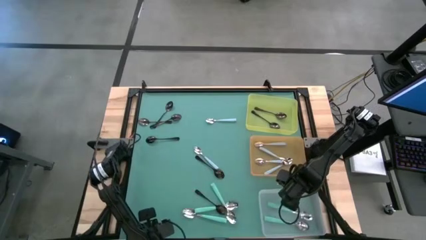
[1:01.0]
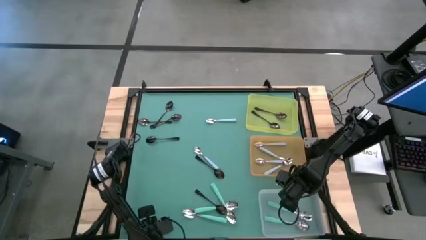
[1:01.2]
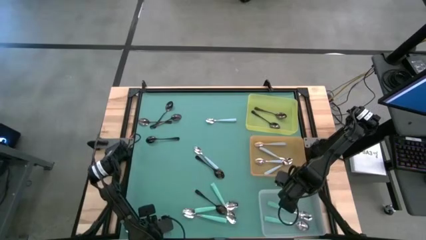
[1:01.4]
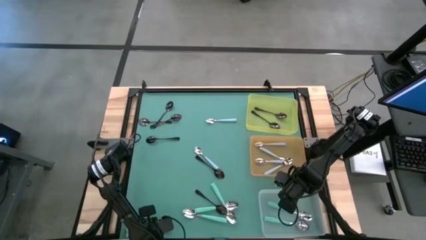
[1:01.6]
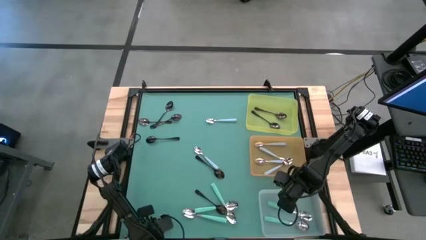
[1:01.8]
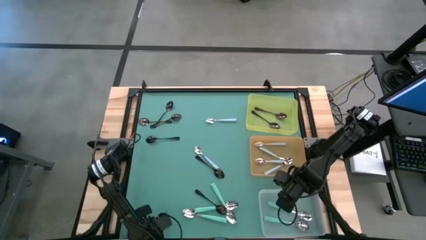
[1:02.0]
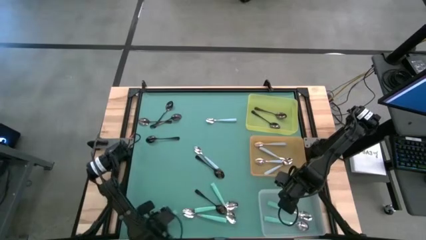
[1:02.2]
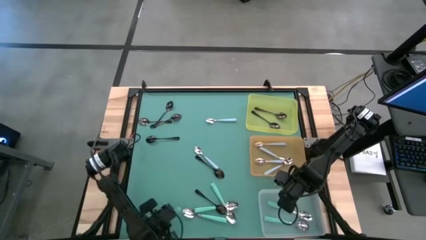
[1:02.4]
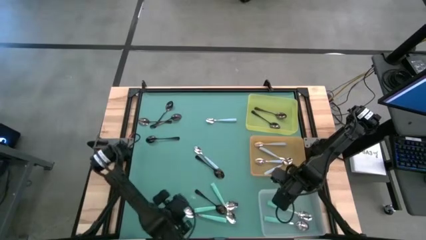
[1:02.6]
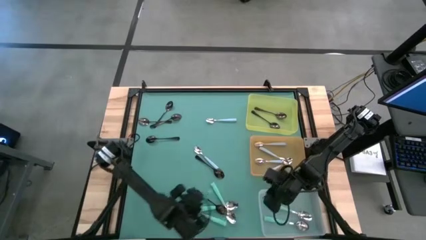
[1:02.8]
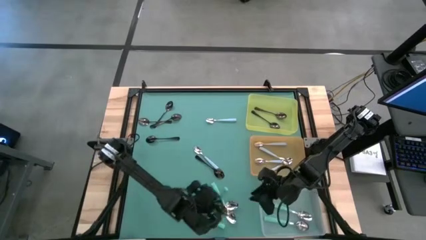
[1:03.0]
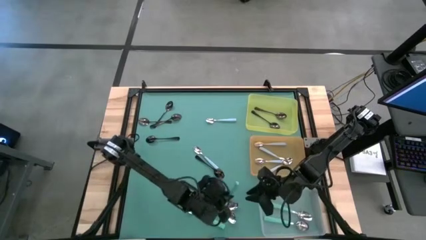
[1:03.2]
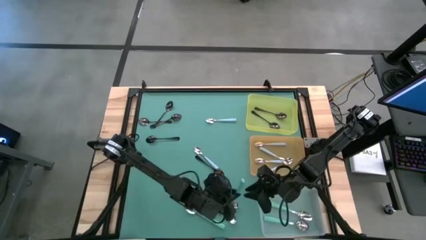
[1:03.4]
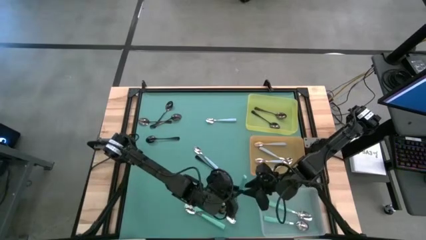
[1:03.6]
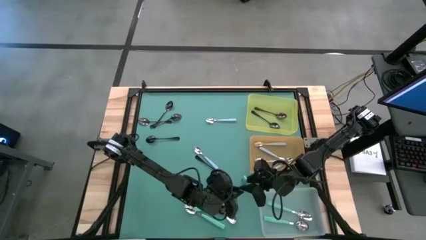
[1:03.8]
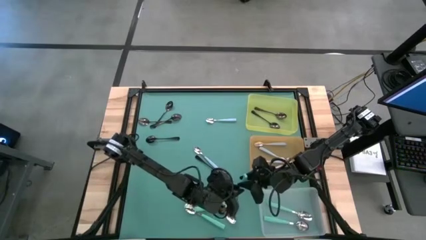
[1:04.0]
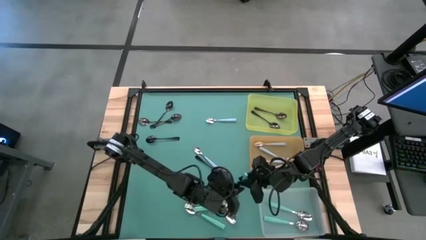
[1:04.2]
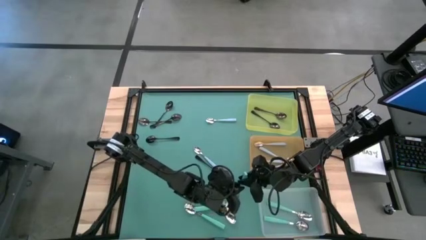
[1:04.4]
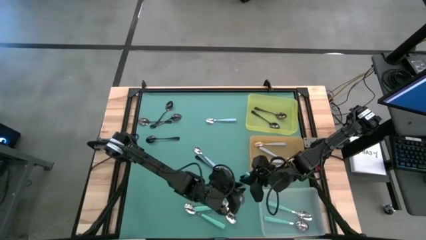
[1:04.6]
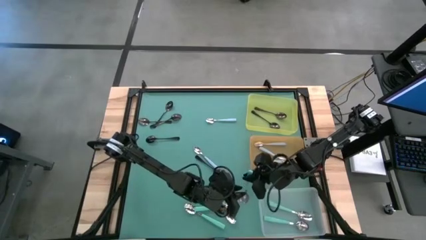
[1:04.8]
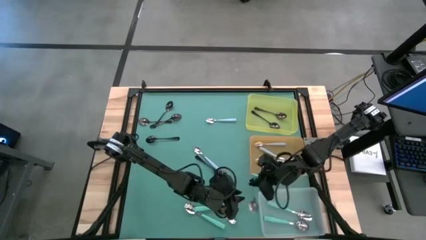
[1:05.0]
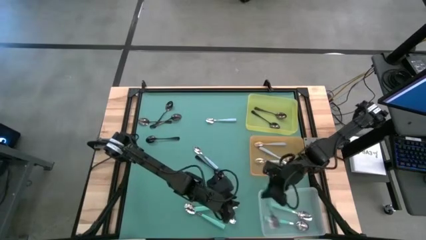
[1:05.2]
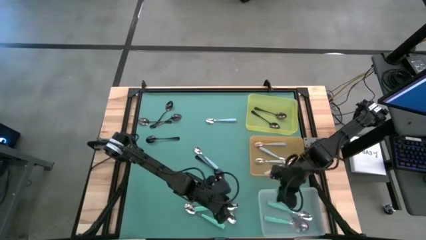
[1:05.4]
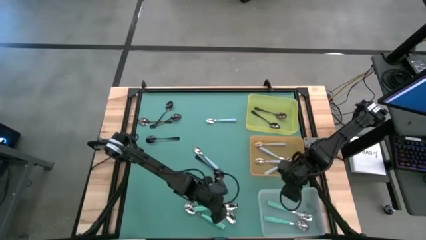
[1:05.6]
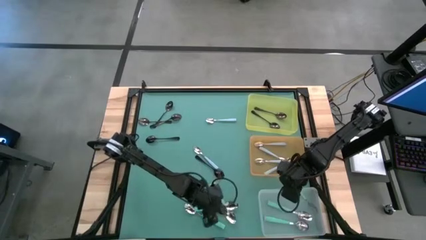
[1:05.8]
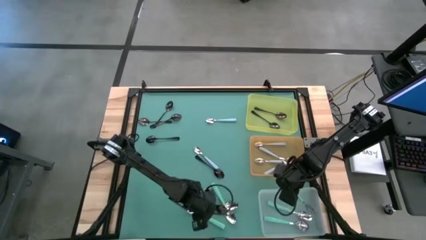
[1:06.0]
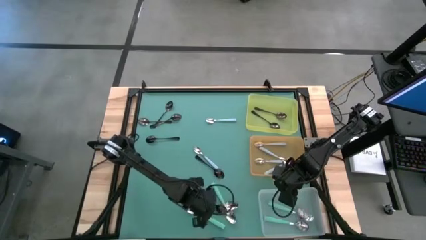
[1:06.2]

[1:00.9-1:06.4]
Task: Sort silverware by color (type)
Put the green spoon into the transparent bin

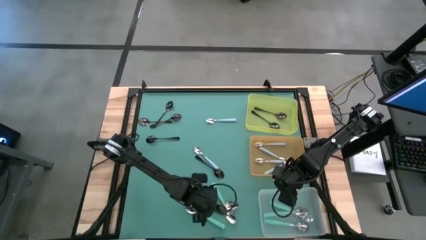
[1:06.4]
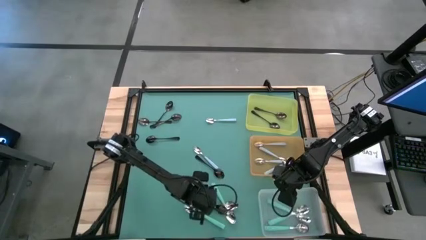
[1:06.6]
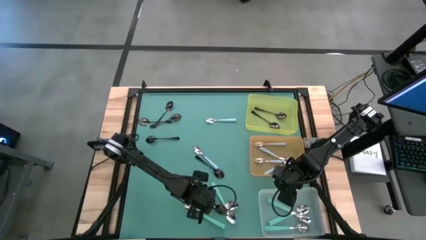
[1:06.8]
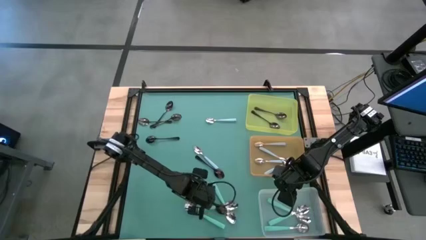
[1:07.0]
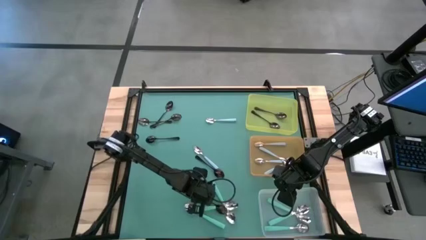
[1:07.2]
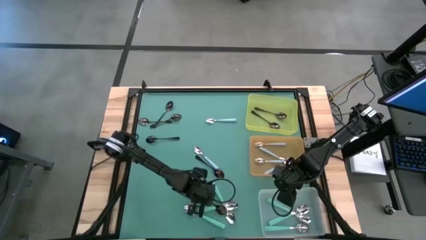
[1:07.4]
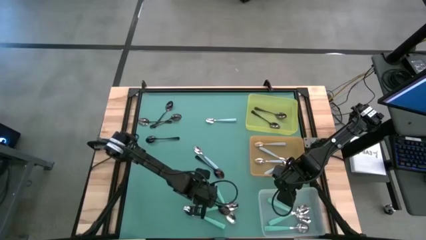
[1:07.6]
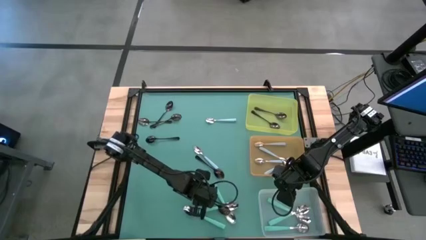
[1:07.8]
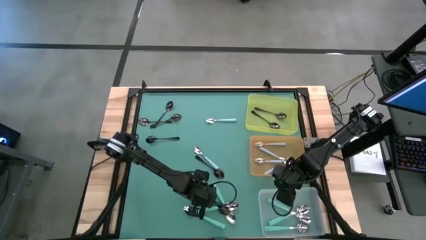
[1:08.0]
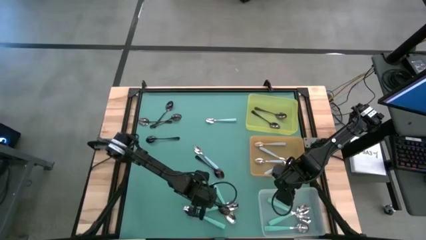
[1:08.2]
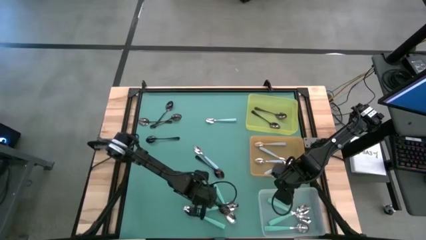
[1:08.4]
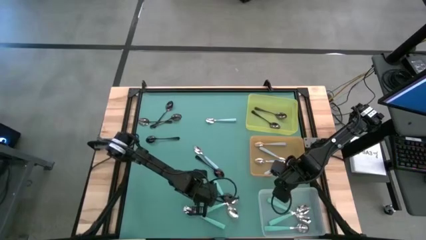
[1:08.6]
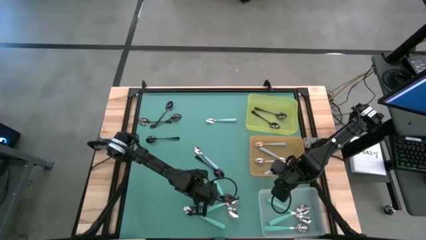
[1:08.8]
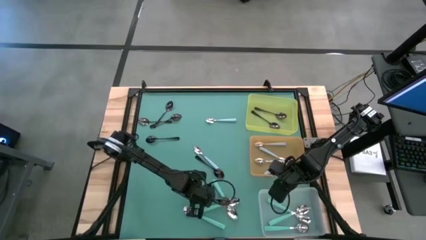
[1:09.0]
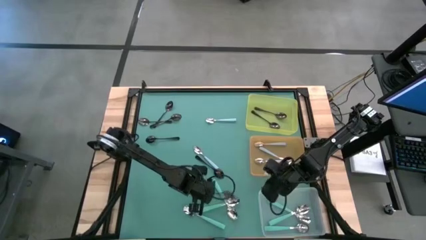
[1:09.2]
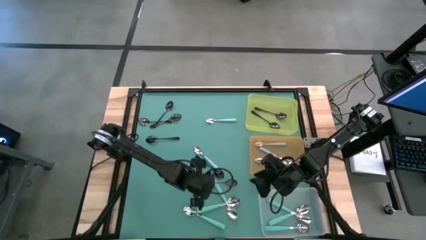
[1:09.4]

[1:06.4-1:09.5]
Put the black spoon into the yellow bin

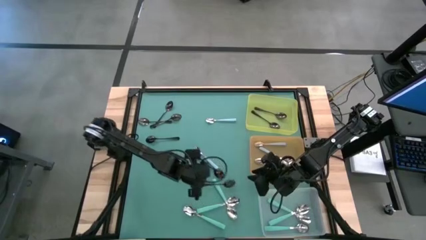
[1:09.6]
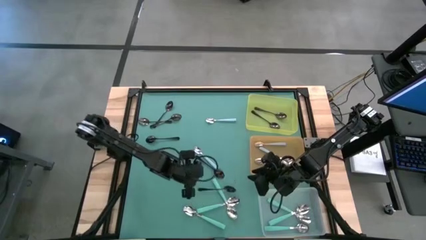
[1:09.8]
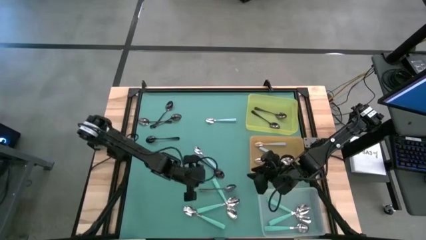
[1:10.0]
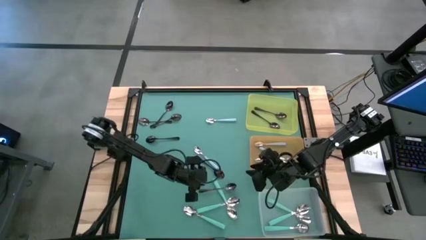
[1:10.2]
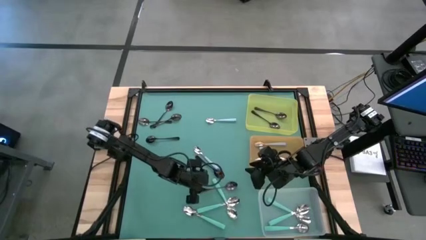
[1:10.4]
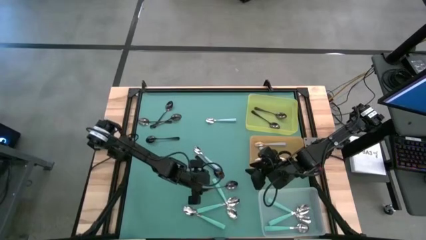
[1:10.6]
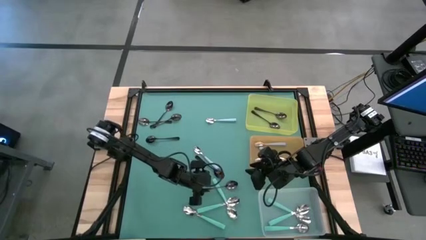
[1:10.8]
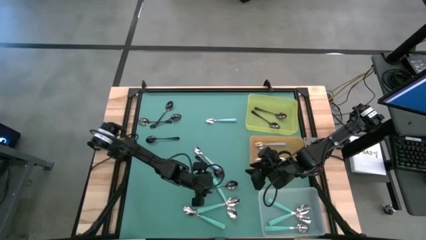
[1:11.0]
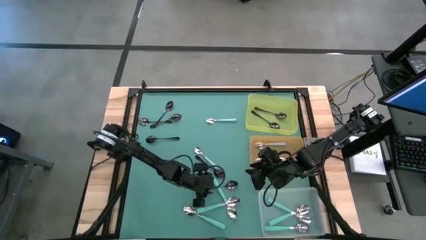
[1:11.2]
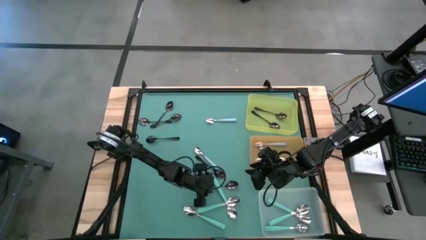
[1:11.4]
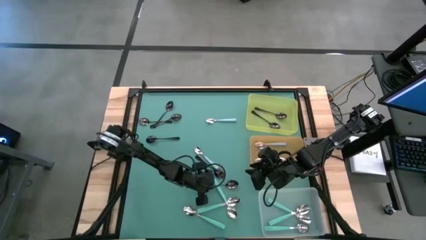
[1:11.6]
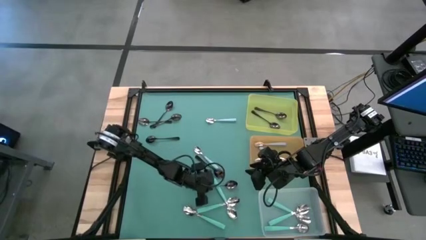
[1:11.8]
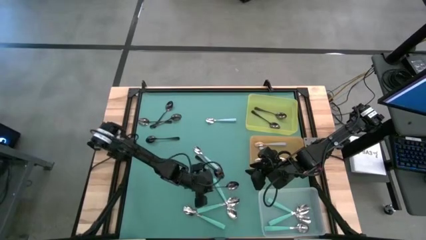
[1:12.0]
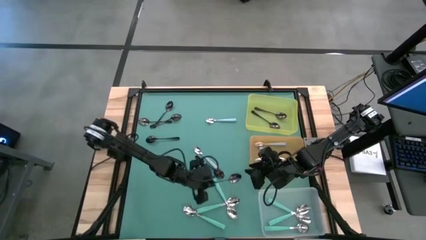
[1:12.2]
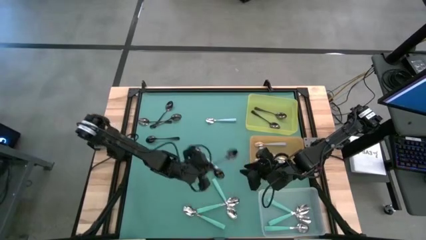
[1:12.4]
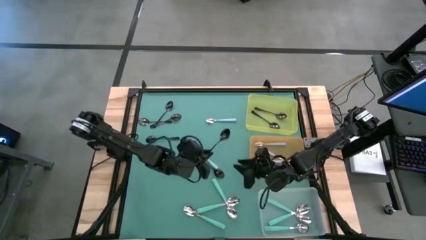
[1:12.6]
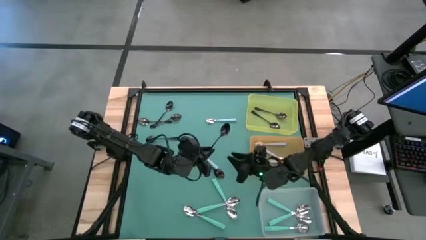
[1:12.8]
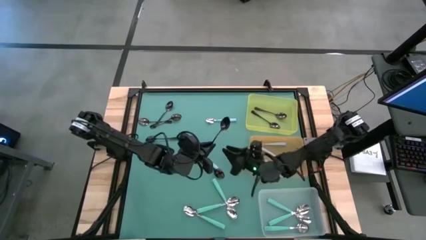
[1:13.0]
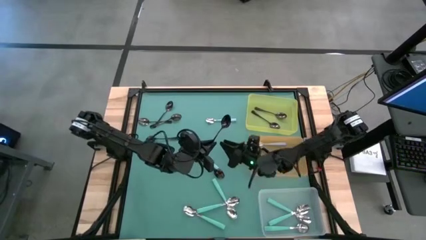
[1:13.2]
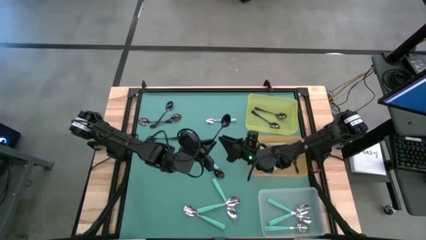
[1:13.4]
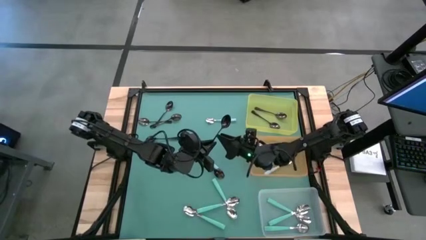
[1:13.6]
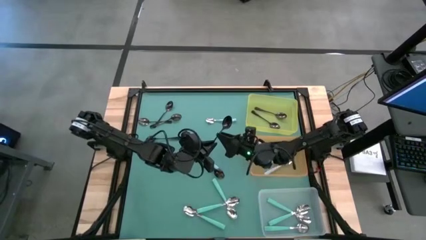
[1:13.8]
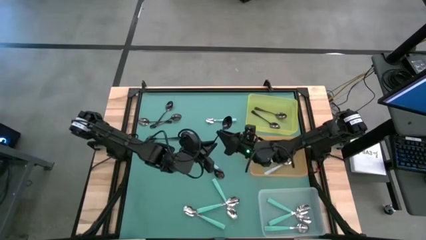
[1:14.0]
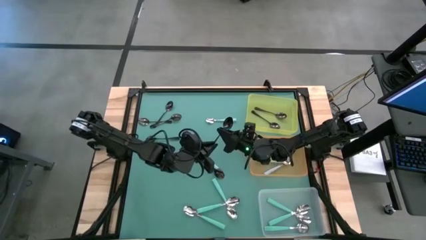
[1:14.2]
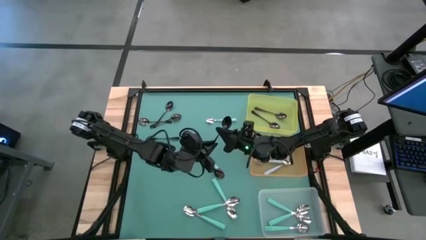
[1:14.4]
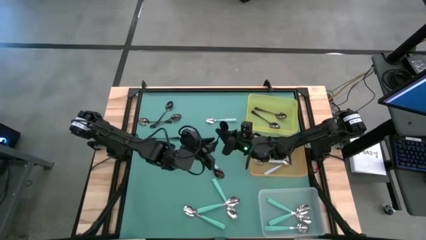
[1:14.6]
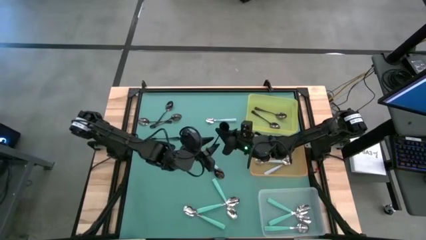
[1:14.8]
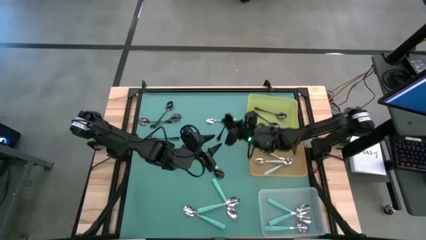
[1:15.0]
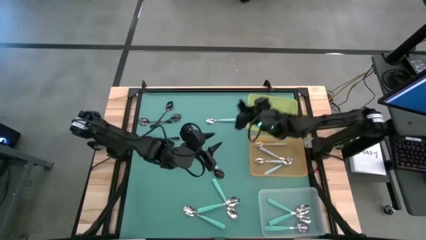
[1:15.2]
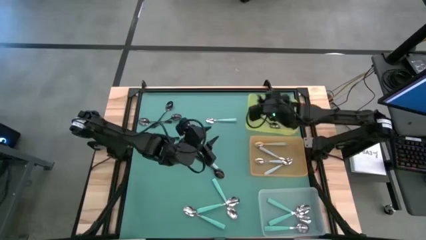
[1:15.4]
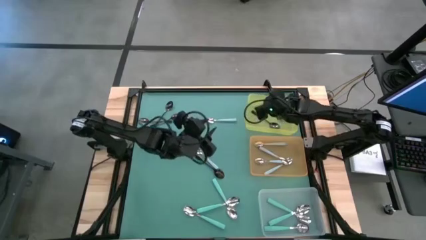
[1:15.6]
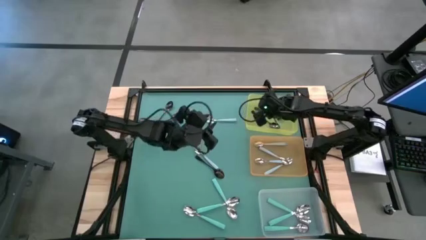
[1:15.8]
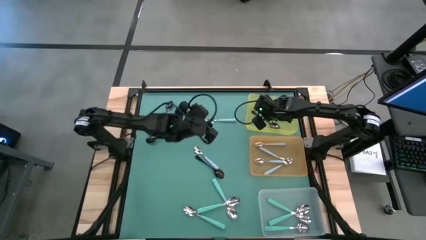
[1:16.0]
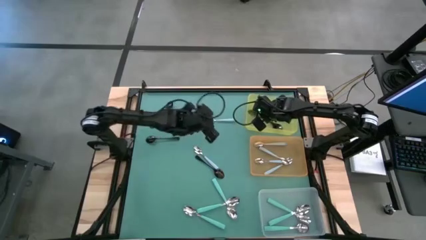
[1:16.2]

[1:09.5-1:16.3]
Put the black spoon into the yellow bin
